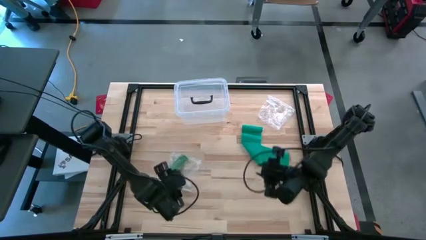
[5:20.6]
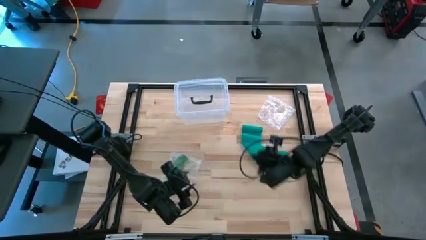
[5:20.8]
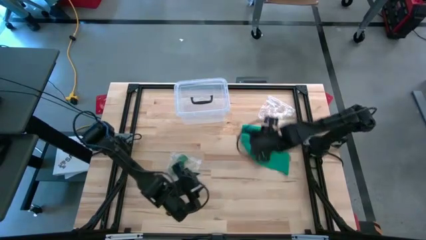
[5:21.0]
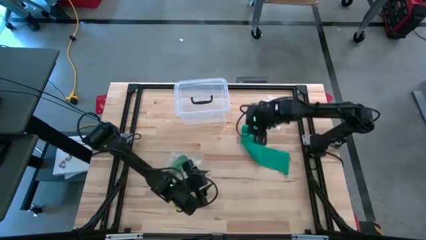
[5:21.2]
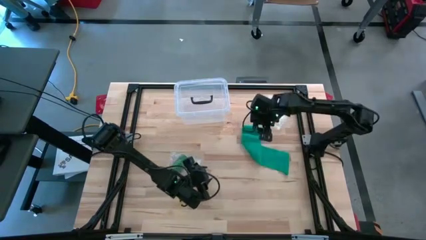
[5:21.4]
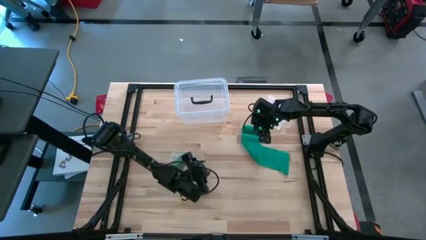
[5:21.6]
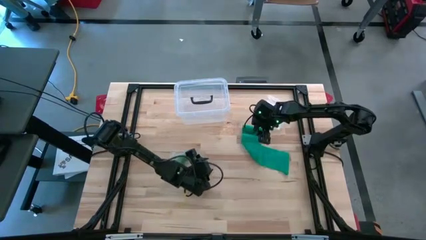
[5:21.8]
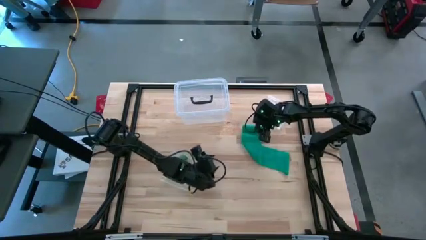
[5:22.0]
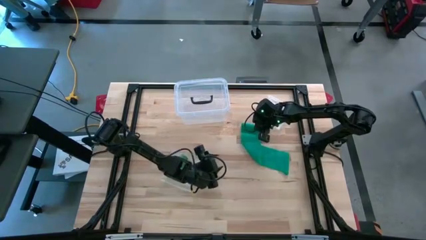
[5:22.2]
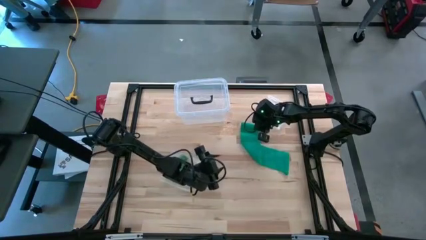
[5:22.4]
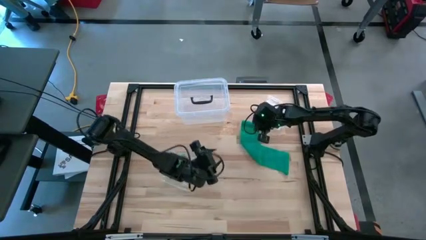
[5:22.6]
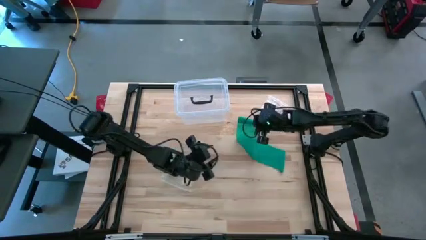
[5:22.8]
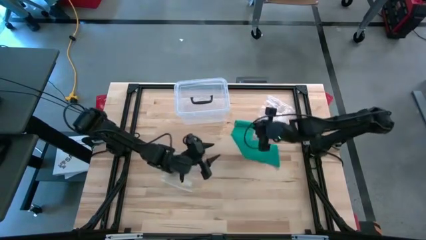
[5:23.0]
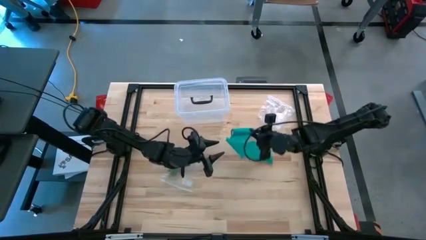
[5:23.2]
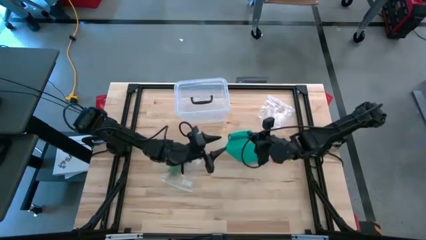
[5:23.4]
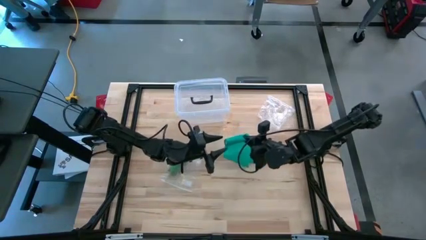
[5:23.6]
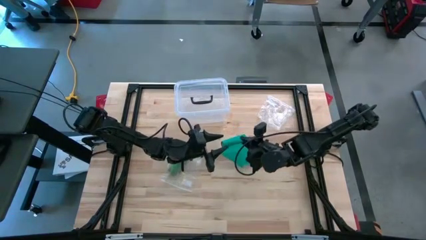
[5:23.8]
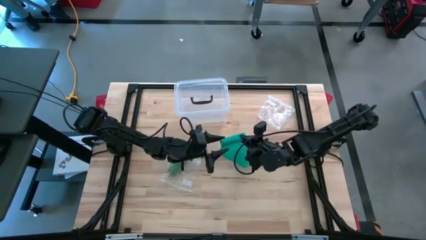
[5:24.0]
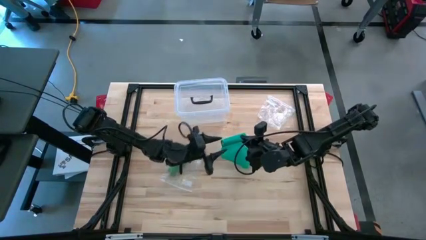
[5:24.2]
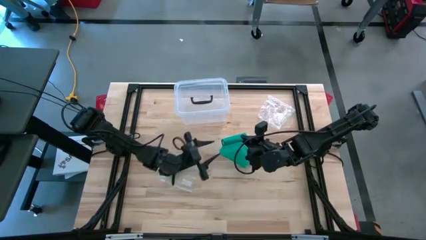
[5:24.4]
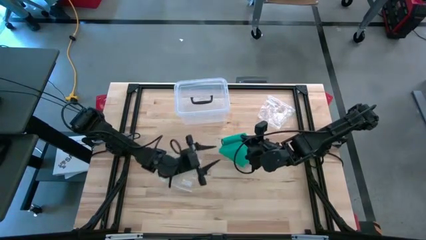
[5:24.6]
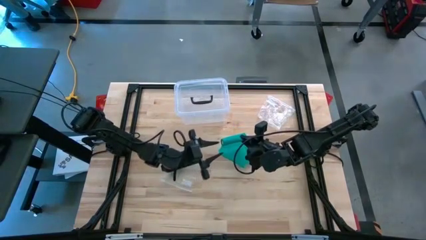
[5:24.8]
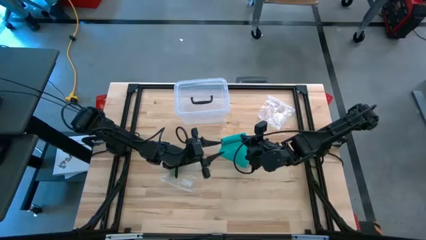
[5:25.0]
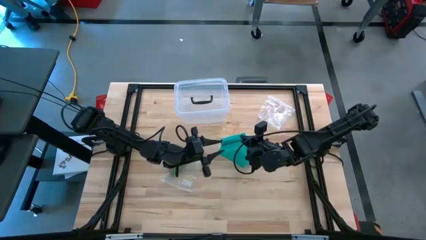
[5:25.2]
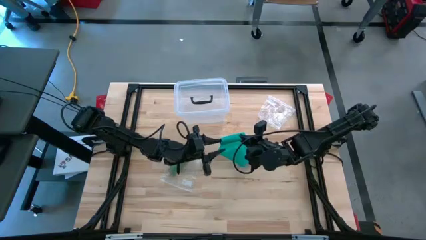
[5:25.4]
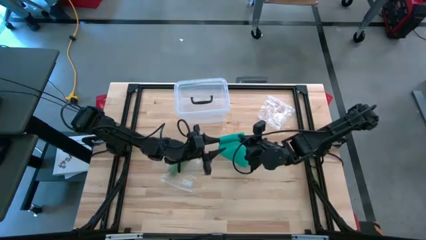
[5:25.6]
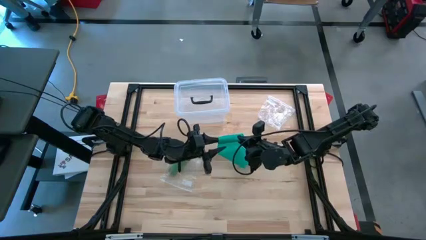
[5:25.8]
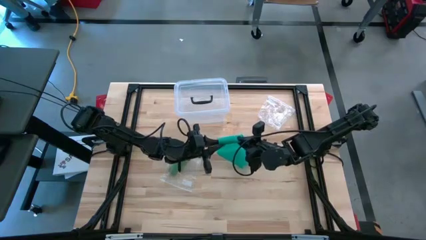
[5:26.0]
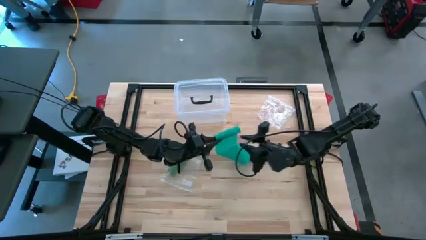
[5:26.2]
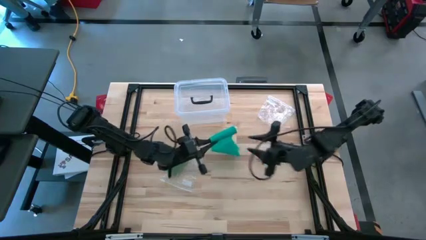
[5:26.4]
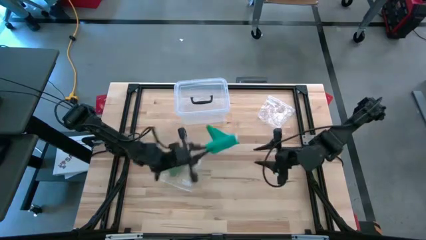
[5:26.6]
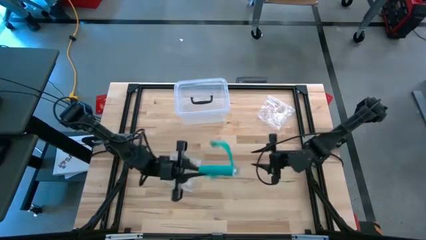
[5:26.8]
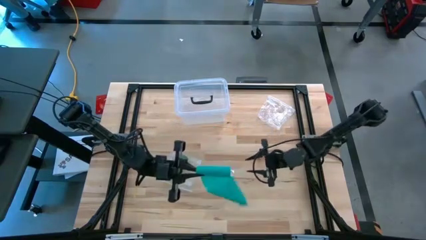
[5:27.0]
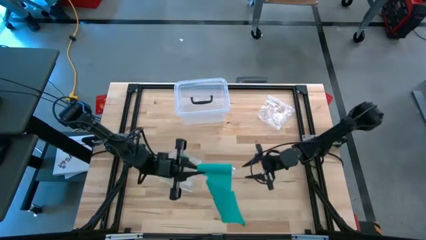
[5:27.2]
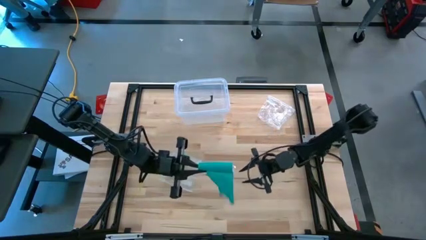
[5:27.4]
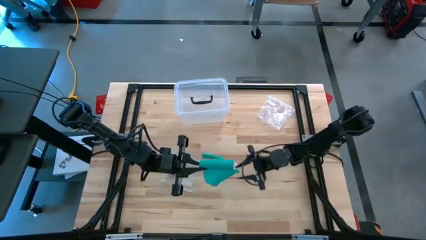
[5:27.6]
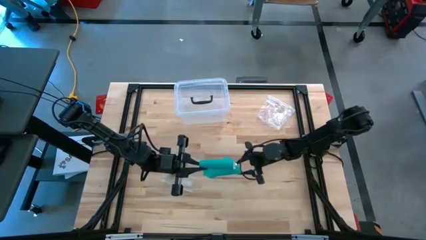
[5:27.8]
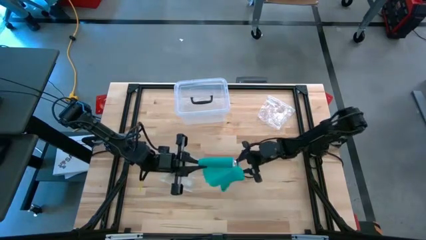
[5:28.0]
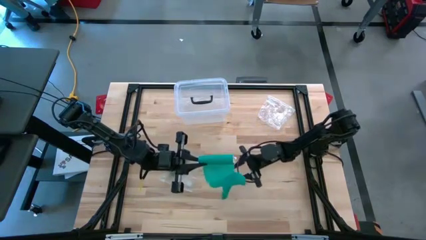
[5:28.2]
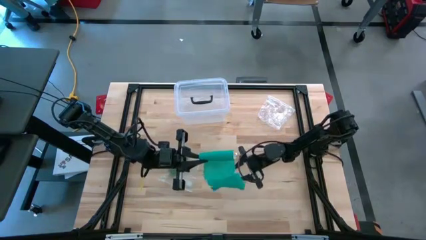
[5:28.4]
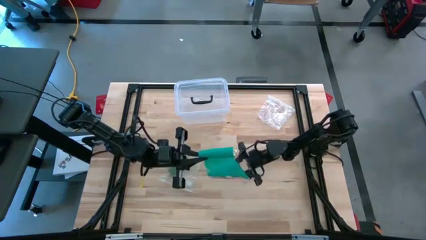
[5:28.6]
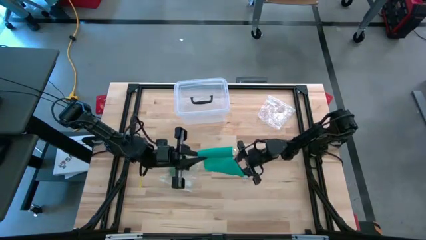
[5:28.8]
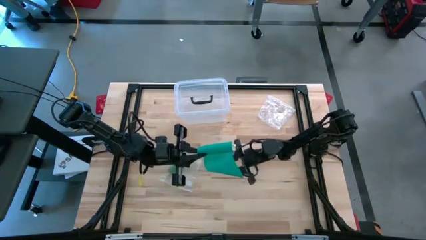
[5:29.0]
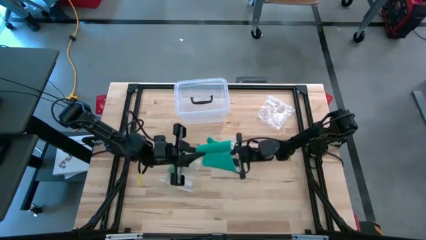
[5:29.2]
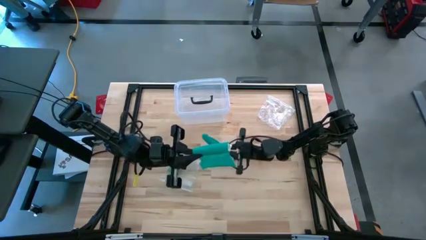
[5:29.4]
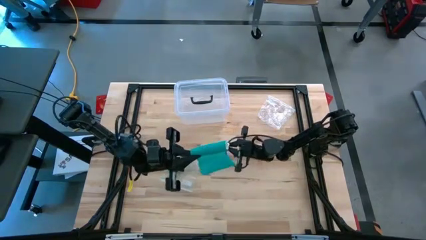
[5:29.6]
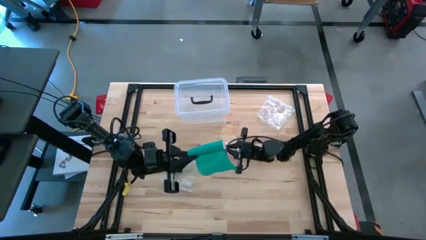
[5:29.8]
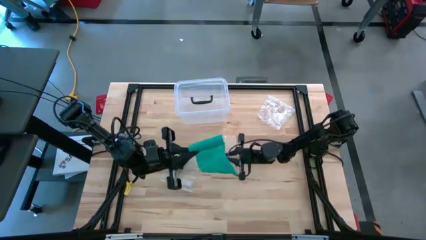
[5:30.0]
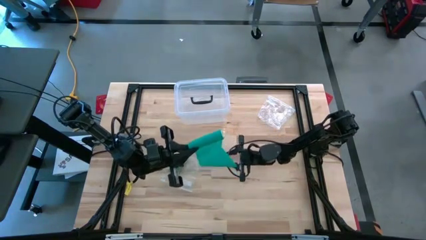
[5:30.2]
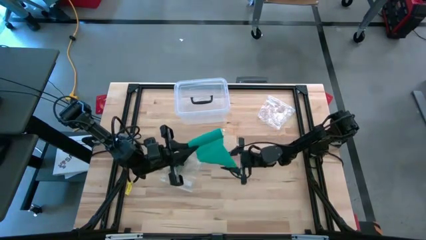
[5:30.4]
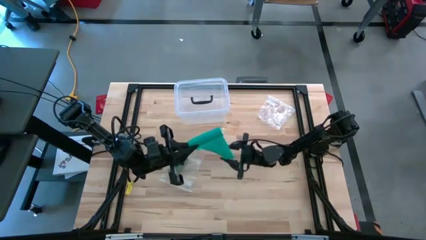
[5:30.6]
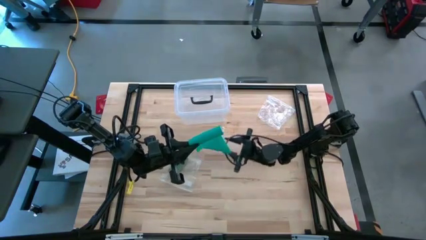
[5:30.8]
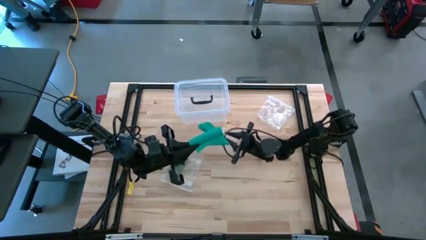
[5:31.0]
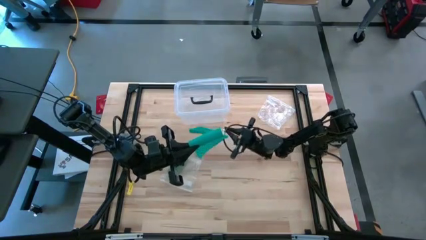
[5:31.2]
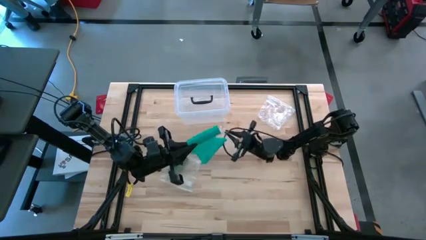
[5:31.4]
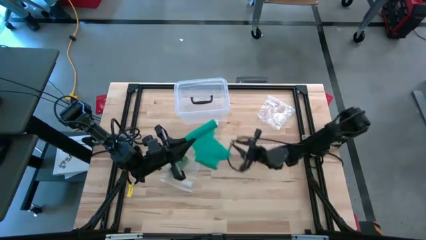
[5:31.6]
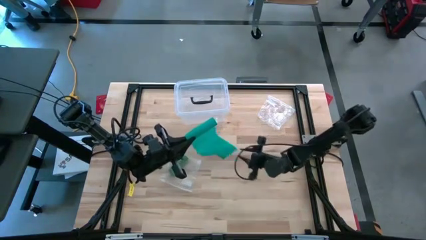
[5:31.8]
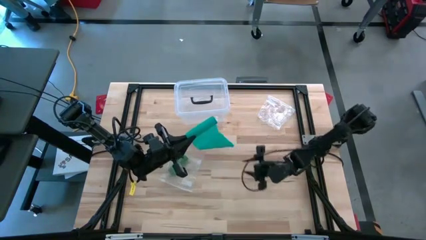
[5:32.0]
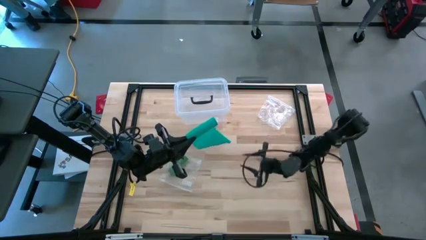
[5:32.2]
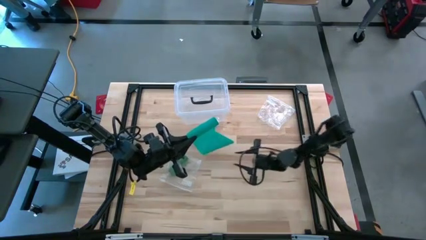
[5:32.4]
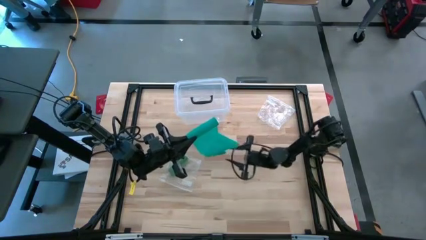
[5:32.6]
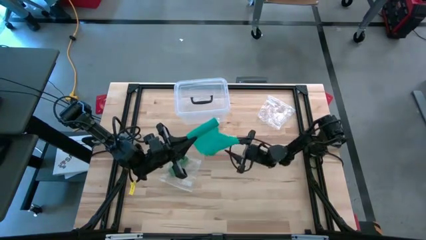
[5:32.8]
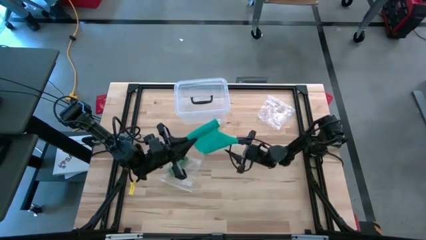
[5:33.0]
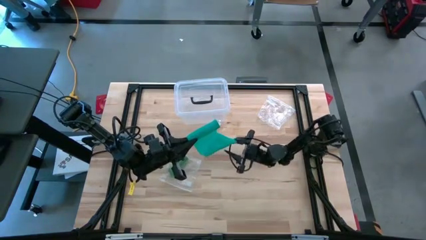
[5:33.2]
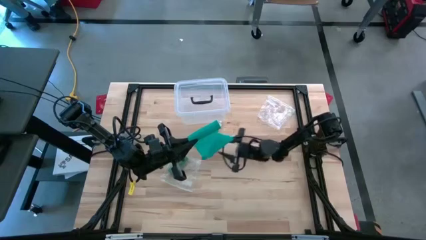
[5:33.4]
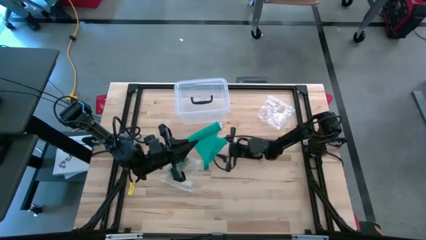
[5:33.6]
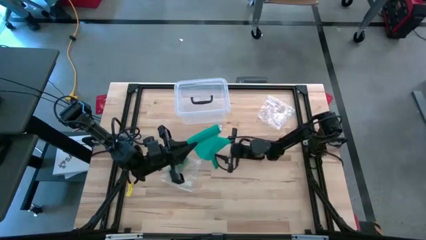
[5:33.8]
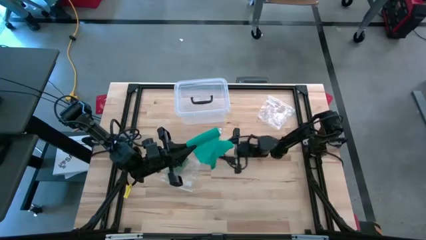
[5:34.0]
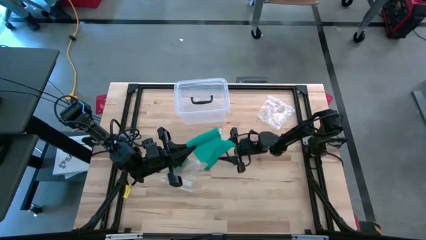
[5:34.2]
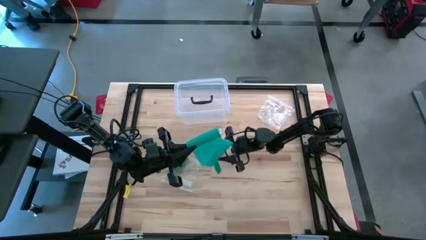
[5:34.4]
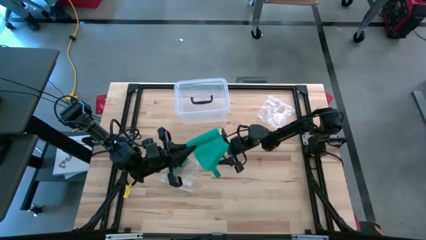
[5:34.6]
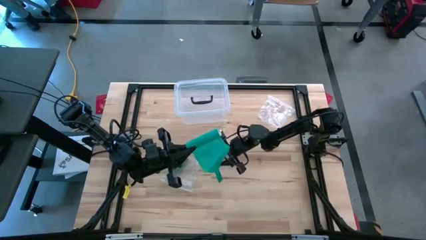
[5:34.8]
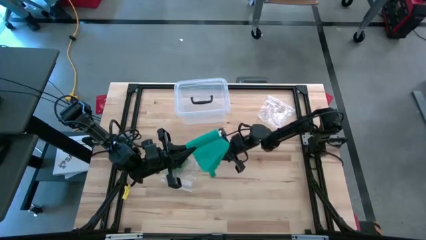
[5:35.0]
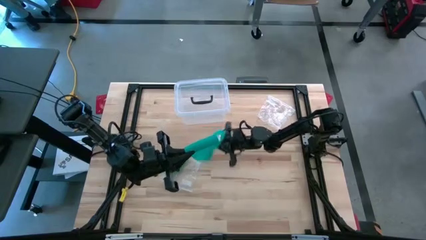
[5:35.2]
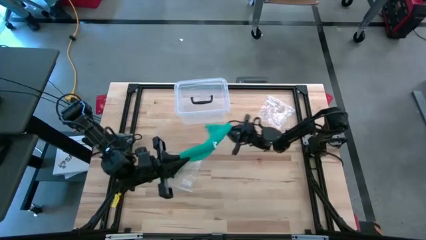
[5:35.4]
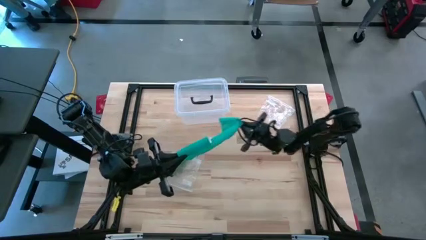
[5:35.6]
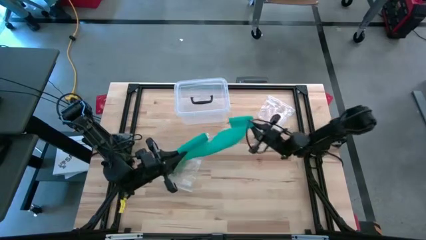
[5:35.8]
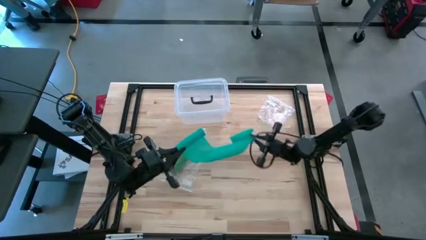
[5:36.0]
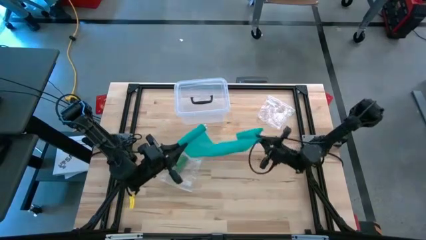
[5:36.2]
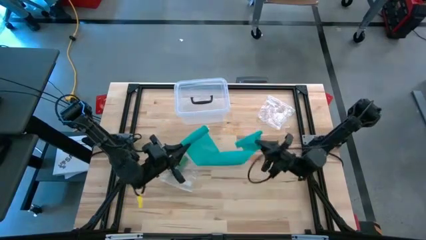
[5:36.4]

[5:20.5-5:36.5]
Task: Roll bandage
Roll the dark green bandage
